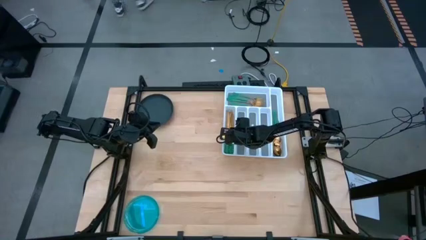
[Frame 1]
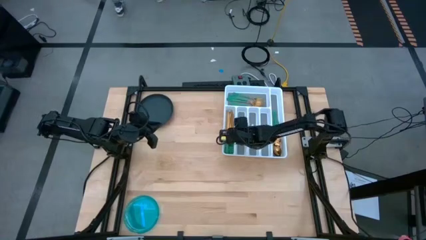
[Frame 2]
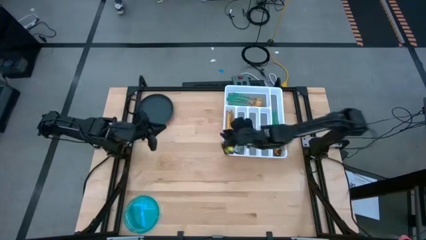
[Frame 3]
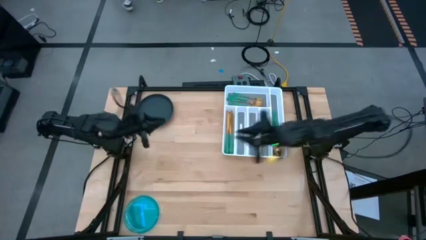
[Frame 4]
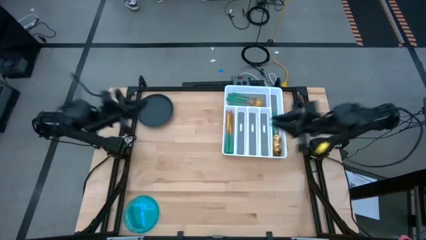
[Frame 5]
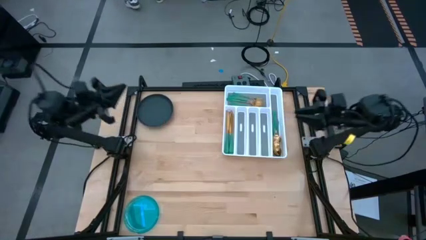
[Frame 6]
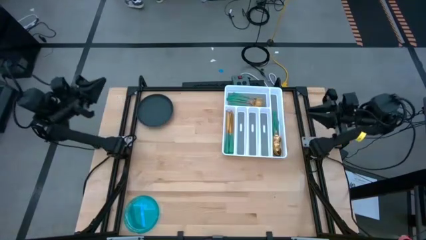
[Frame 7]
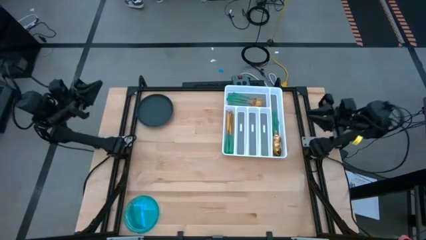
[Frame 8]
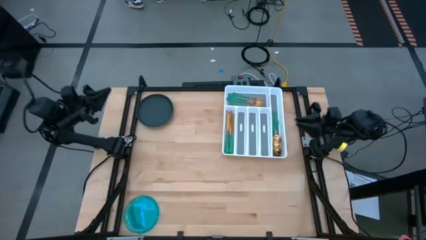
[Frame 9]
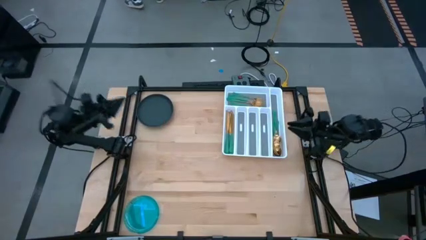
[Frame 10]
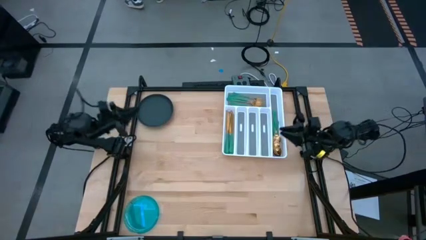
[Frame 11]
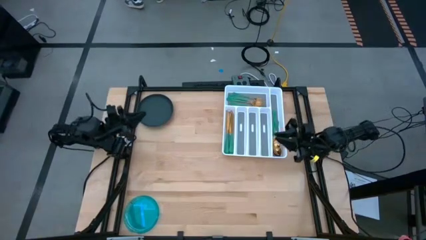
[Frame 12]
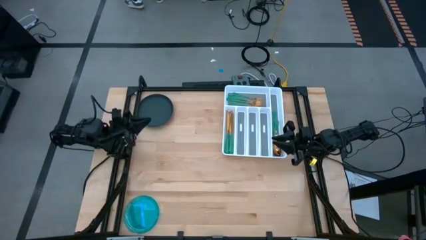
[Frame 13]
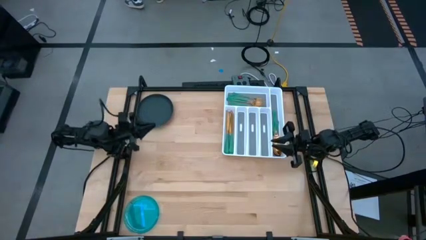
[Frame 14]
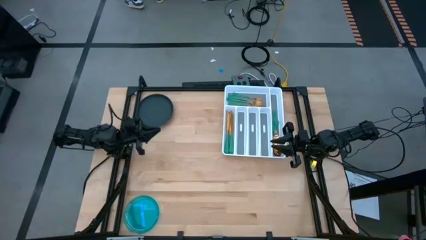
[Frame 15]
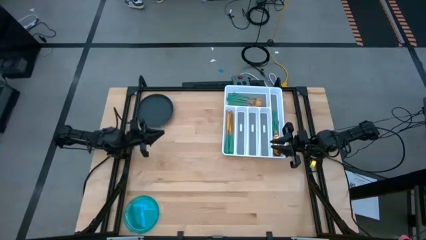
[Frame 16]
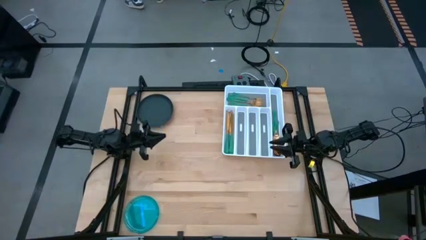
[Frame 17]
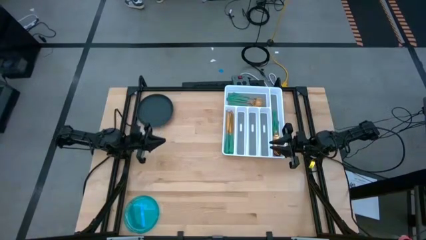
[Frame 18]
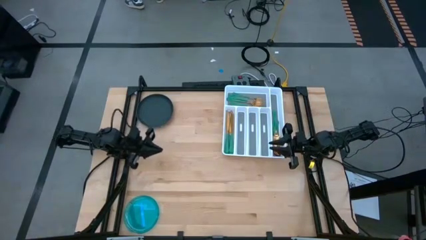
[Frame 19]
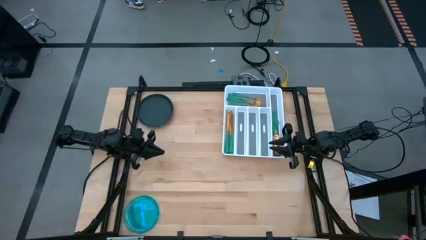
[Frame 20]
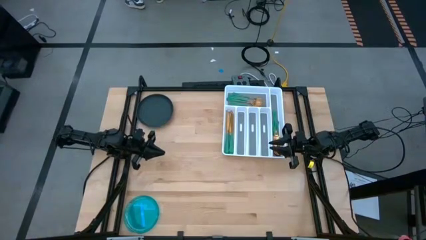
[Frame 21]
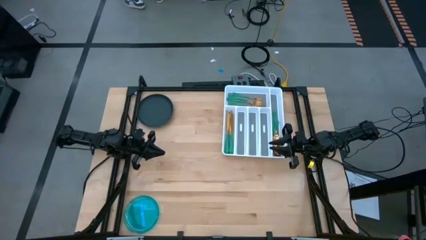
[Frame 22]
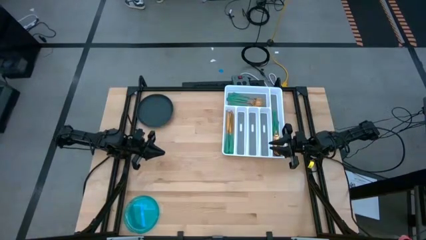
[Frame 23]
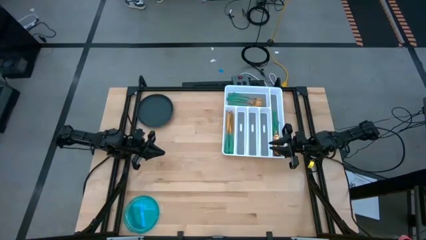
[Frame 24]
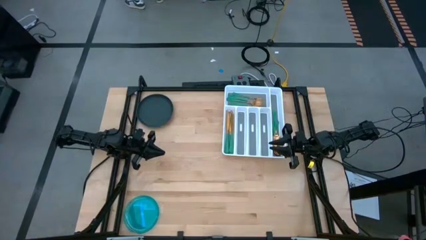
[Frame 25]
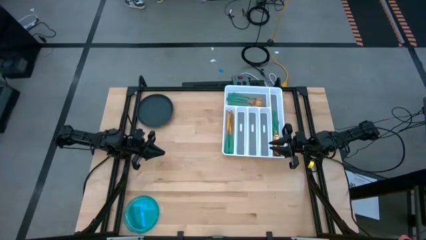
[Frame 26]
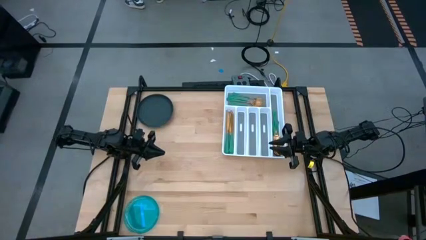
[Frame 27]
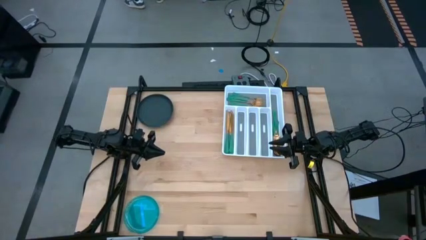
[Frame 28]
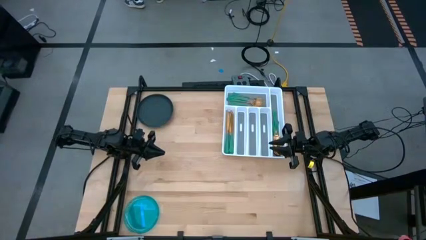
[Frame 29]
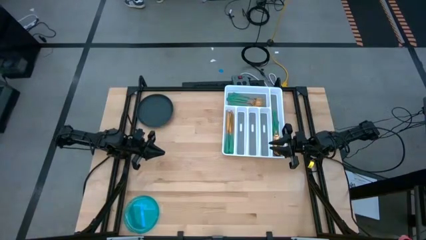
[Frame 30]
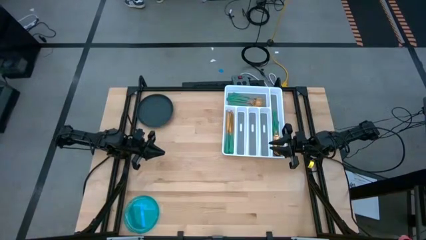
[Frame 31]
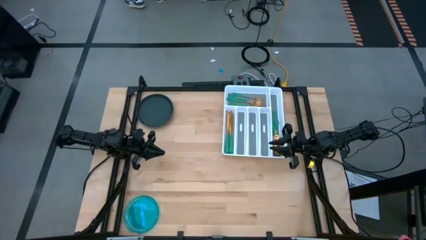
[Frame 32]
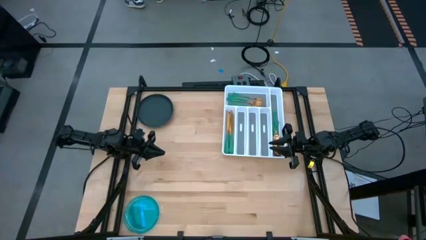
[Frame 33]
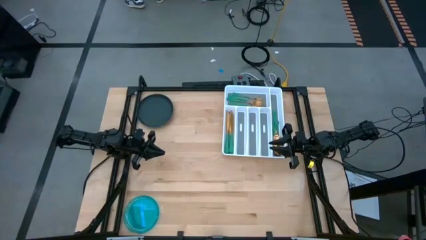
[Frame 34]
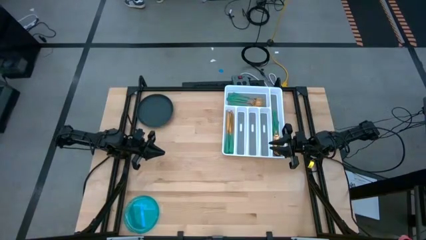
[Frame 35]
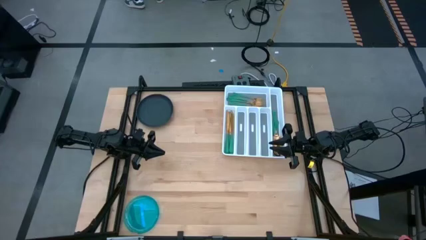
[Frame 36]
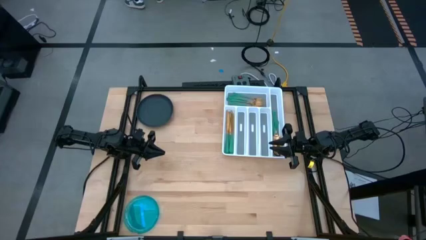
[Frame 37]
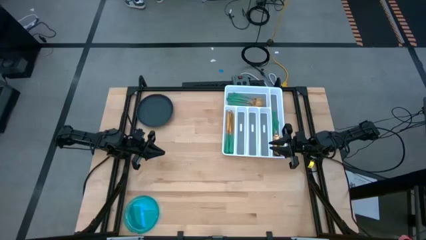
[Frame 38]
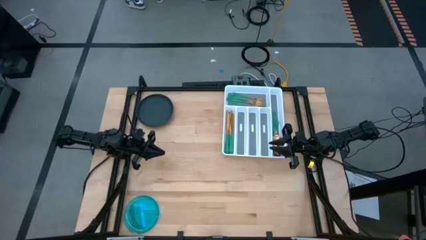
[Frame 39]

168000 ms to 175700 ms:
Task: Sort silverware
Return to Home Position

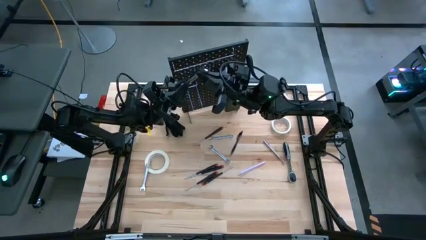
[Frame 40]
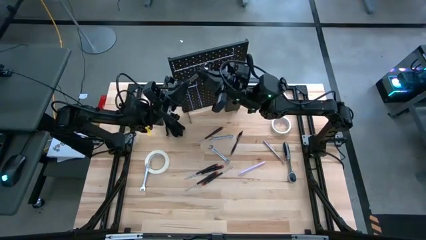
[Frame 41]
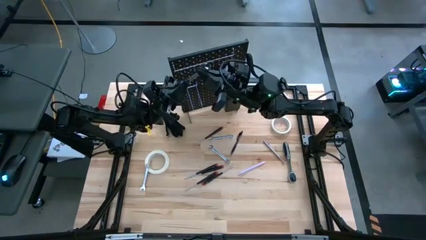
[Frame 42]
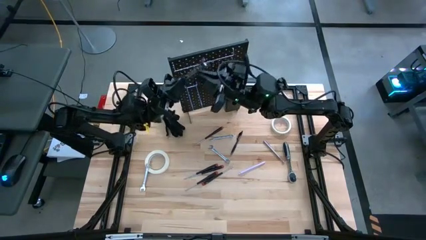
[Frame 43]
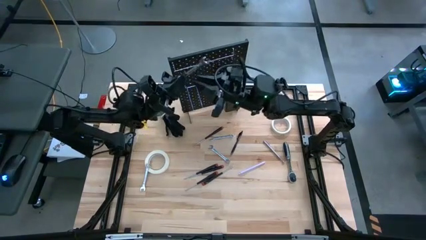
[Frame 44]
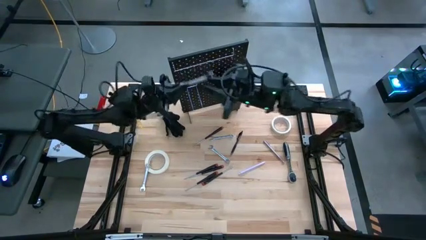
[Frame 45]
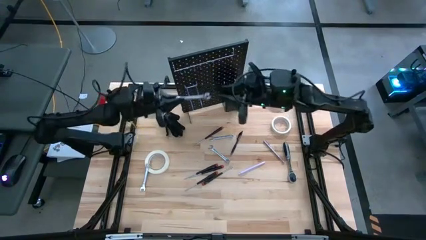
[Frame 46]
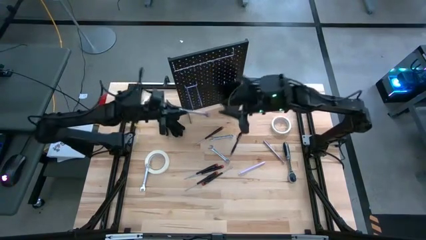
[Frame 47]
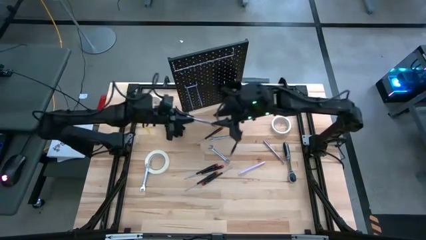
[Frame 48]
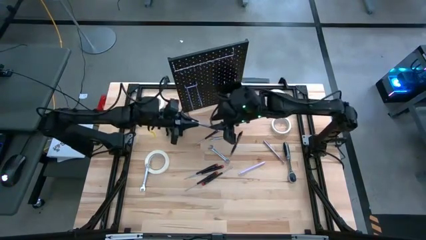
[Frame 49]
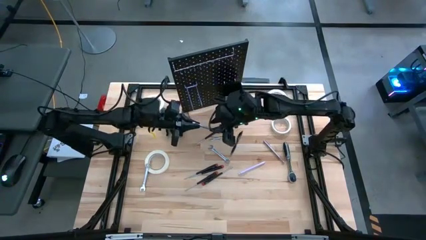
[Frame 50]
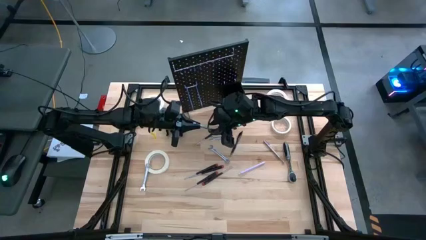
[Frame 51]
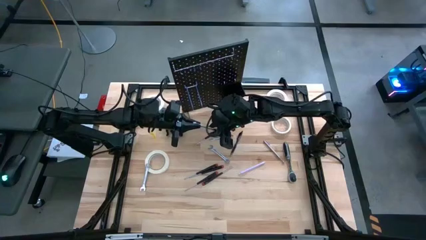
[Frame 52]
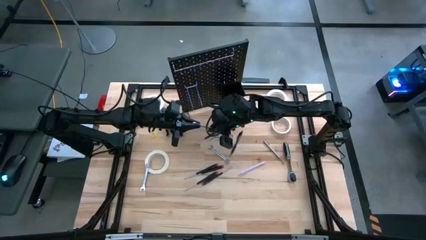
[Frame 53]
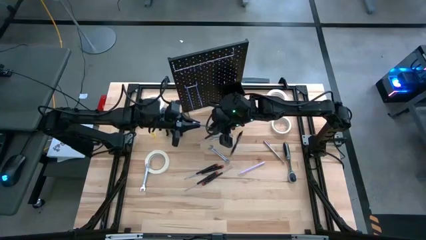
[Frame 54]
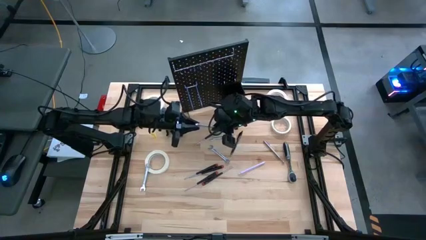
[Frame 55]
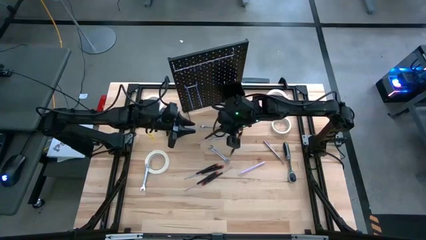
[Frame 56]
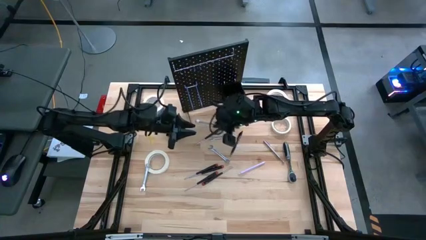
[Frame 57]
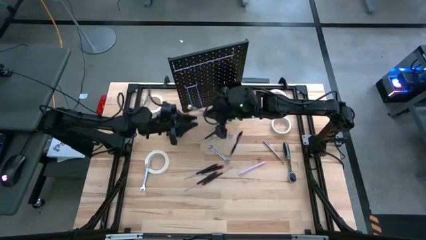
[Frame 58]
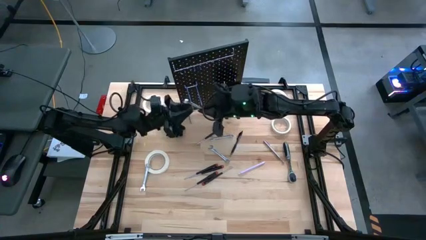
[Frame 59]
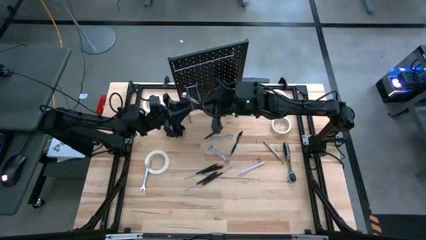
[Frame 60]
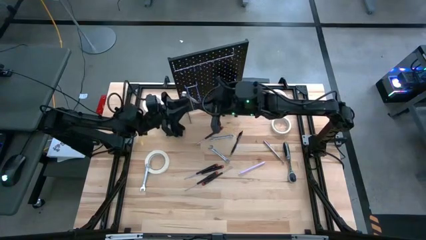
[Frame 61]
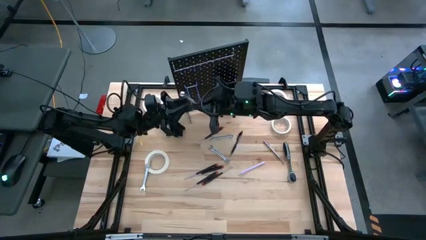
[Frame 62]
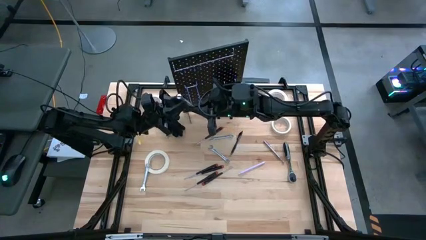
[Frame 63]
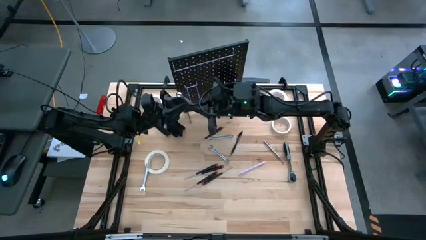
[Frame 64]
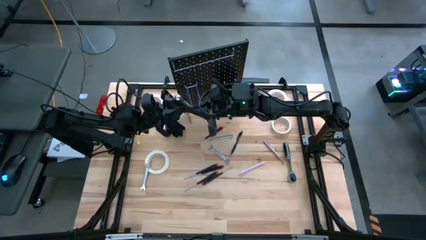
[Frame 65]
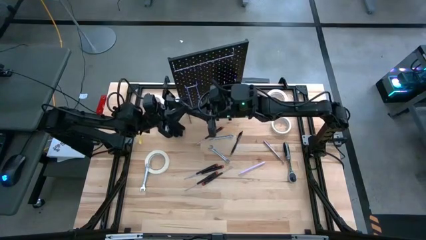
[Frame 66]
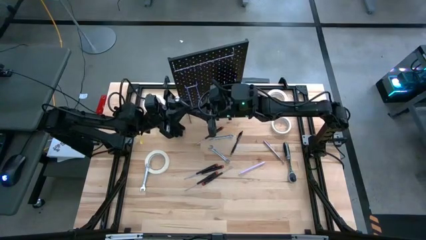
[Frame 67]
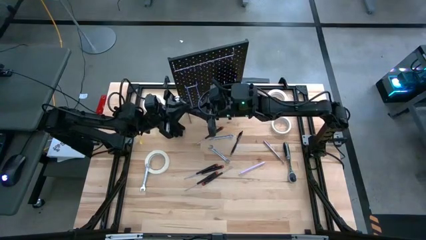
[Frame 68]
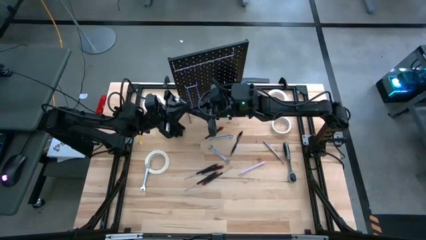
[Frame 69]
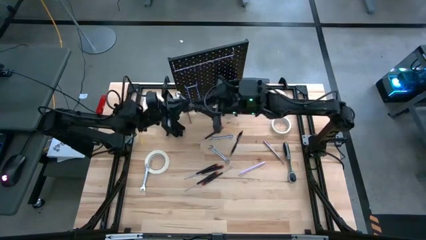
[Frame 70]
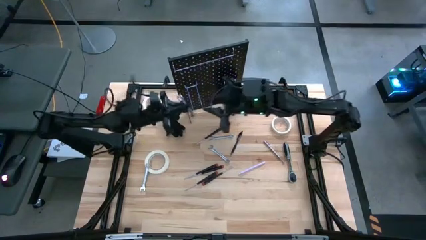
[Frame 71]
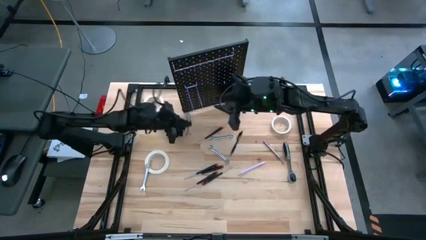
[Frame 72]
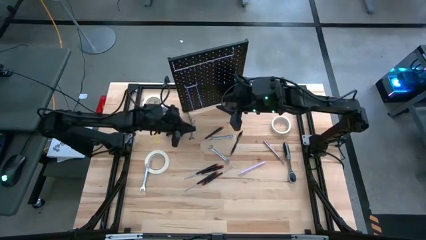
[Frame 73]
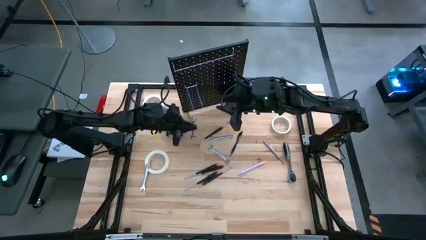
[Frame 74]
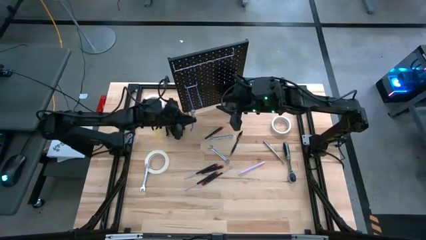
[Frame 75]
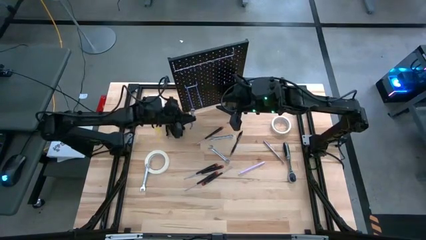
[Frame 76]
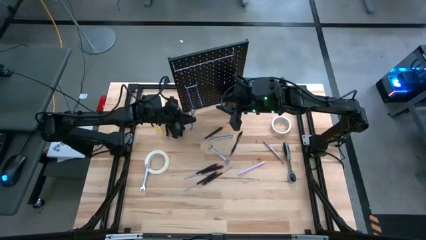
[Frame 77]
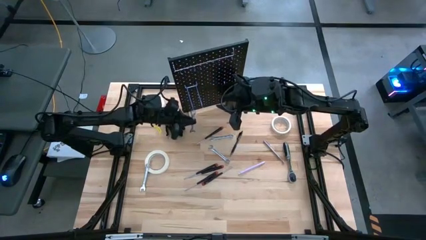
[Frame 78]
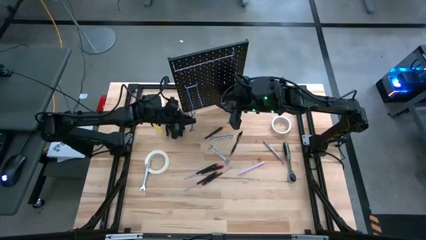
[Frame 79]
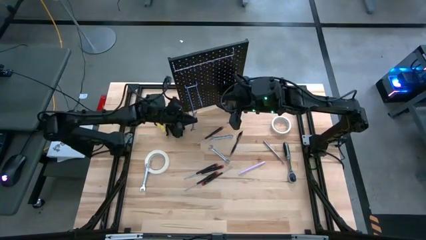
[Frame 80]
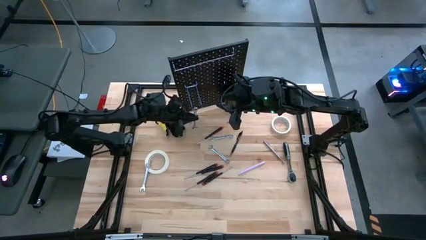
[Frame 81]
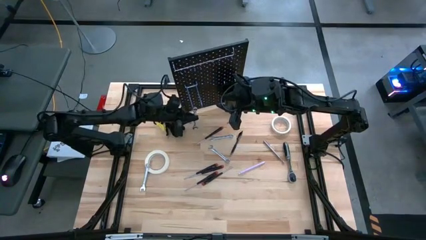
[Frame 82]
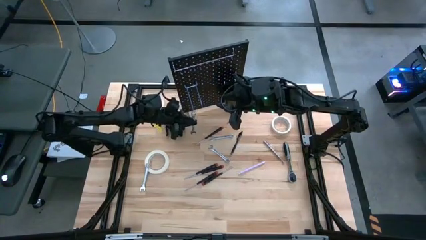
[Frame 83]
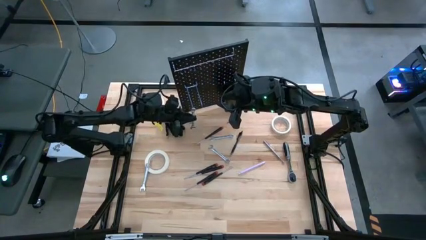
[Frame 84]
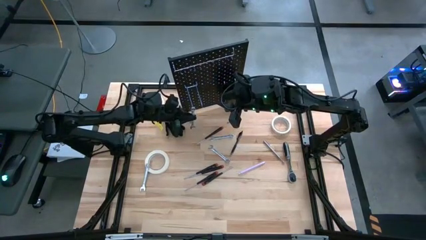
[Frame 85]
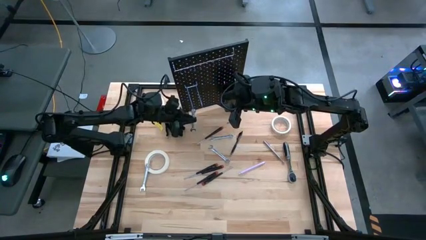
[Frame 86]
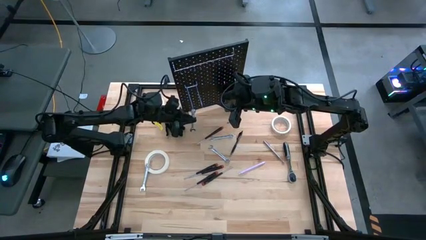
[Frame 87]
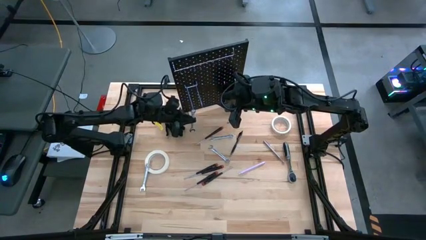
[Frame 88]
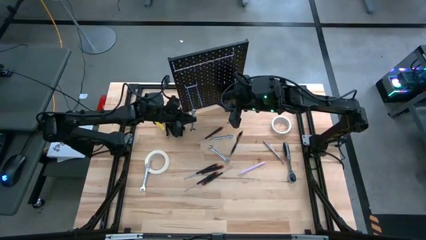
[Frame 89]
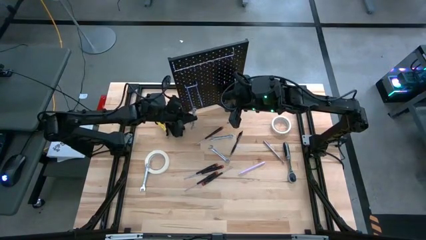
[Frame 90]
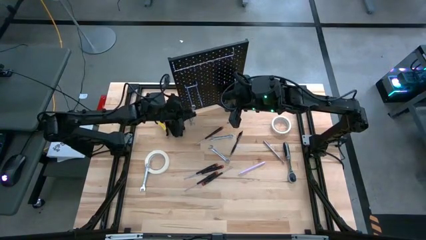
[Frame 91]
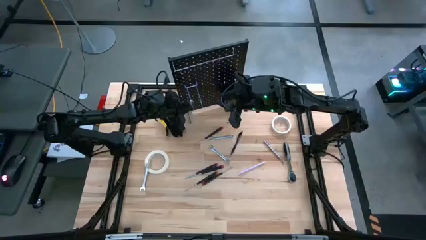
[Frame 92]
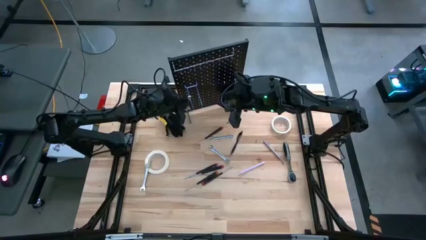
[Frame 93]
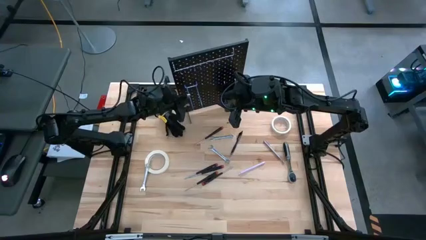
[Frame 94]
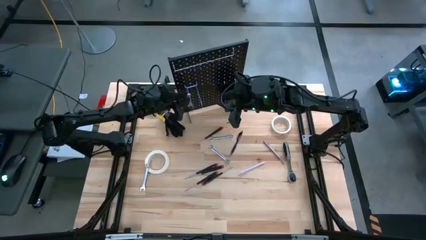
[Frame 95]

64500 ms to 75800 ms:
Task: Hang tools onto peg board
Hang the silver wrench on the peg board
